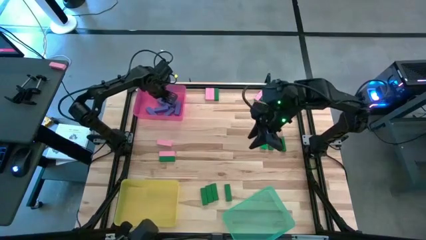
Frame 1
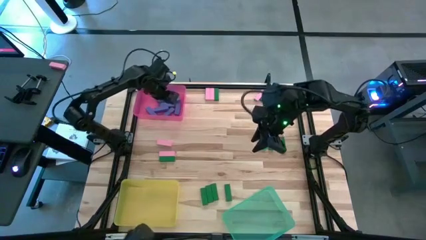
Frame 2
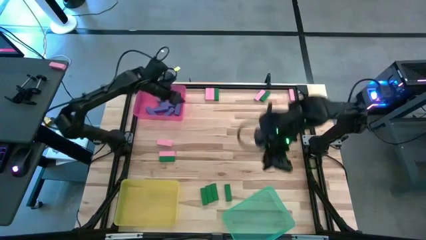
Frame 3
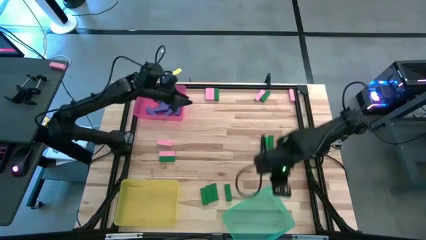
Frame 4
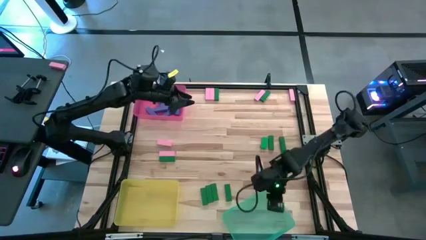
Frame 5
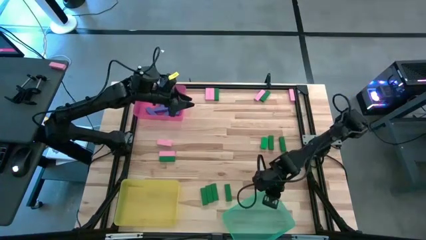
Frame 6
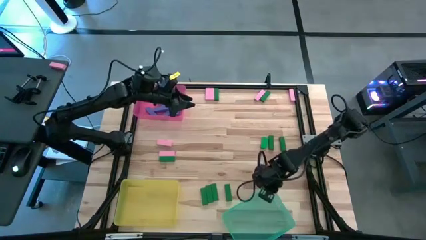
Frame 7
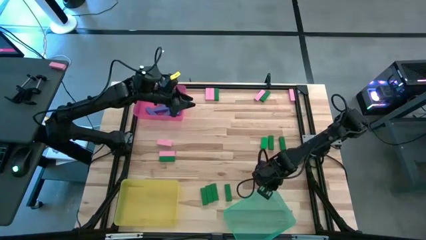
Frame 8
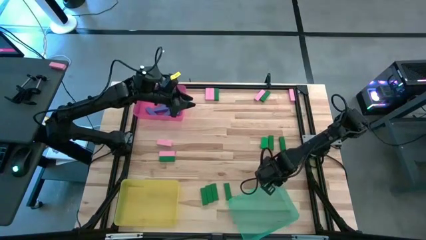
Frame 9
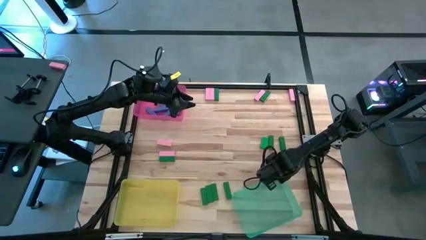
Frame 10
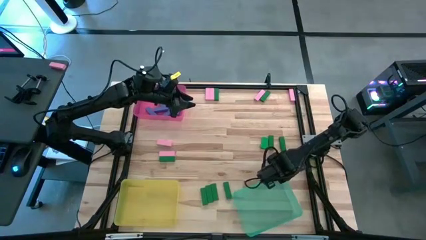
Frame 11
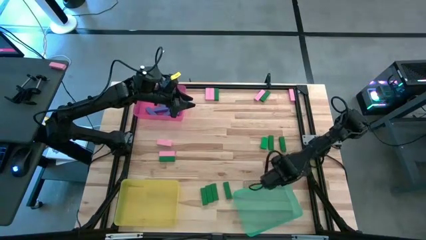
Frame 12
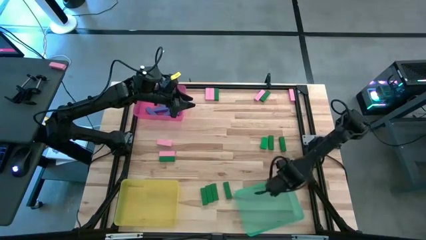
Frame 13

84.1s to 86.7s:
Task: Sort blocks
Adjust the light green bin

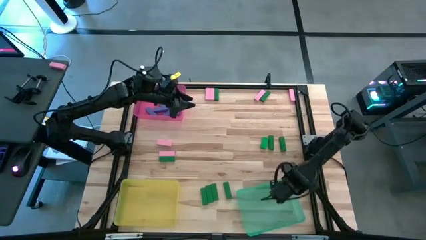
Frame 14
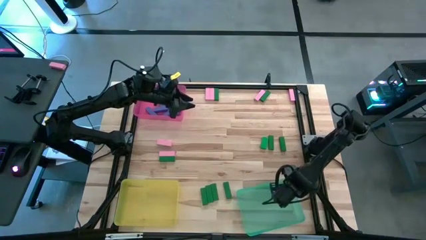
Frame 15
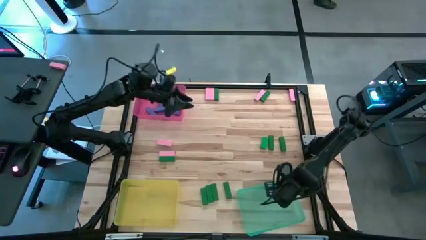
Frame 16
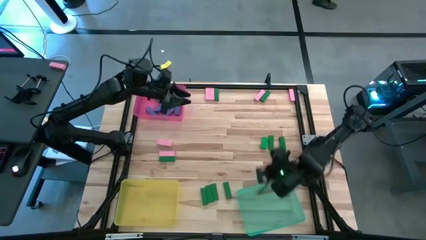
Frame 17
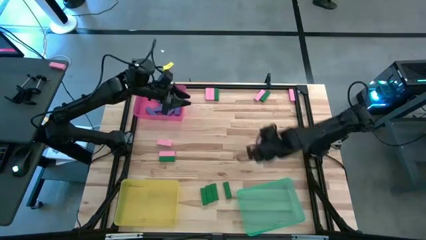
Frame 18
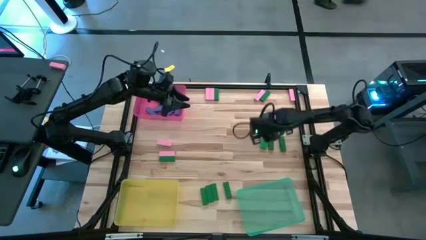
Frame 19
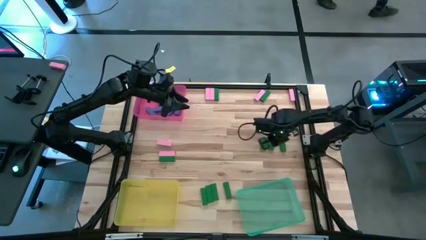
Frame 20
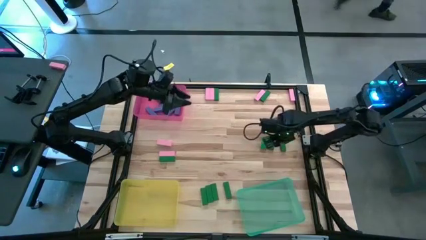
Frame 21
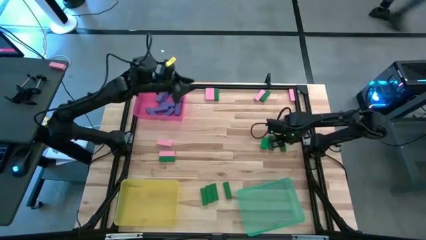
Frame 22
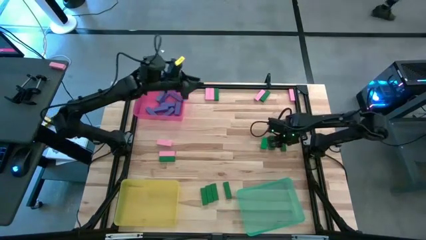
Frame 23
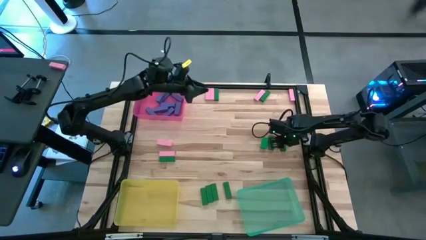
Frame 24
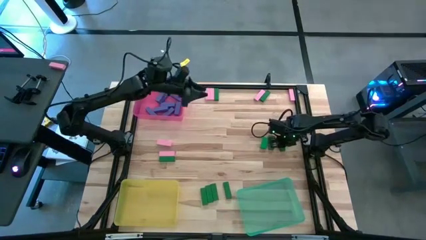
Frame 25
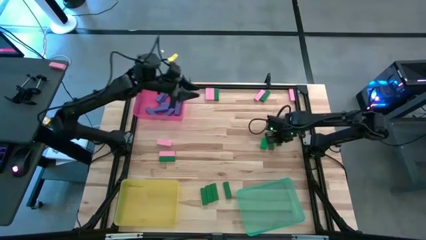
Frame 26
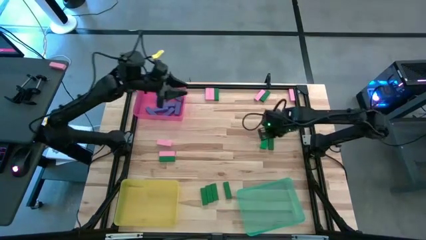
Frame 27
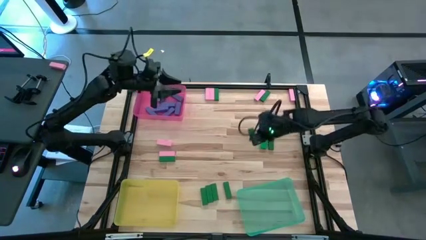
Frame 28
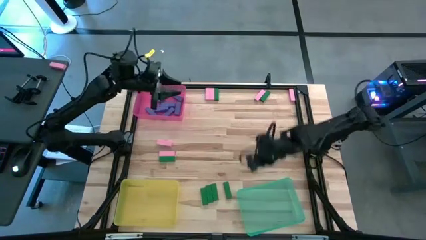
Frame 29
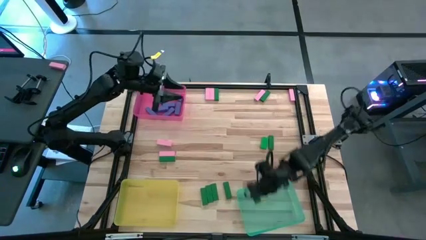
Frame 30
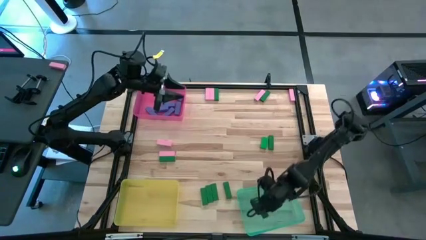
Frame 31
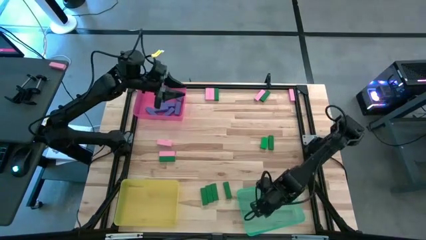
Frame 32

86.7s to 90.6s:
Put the green block into the light green bin

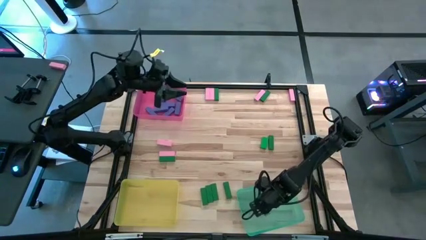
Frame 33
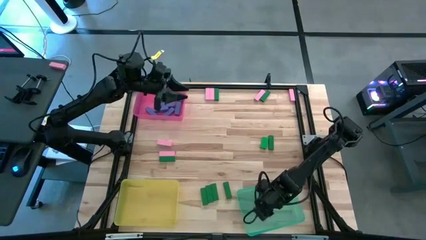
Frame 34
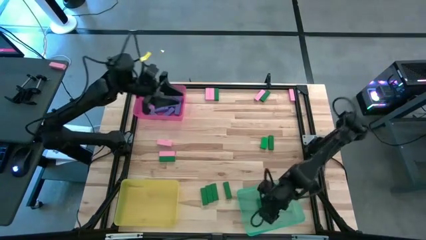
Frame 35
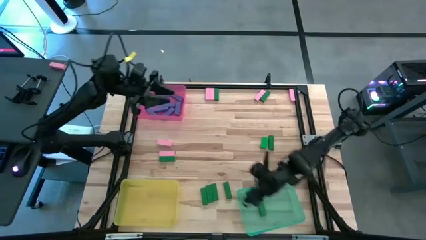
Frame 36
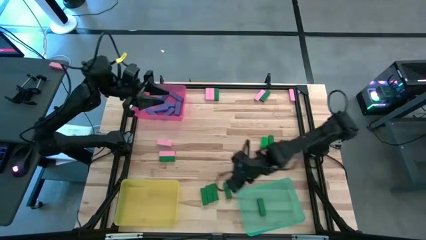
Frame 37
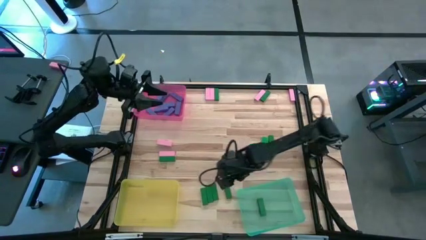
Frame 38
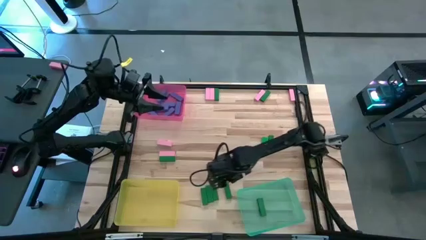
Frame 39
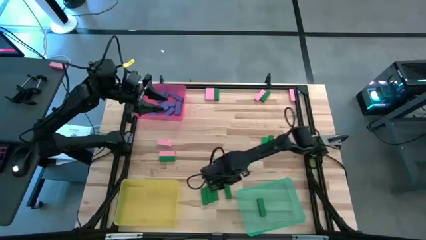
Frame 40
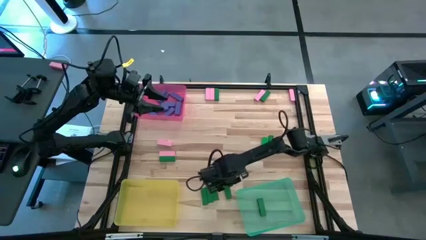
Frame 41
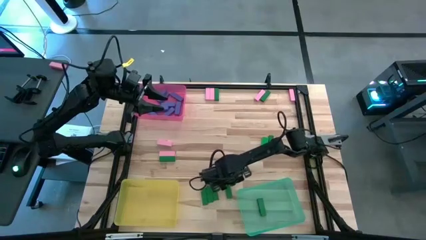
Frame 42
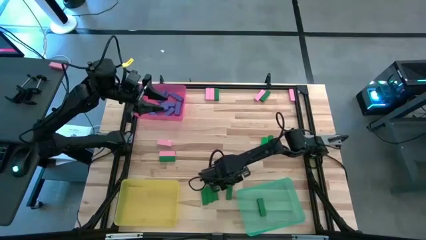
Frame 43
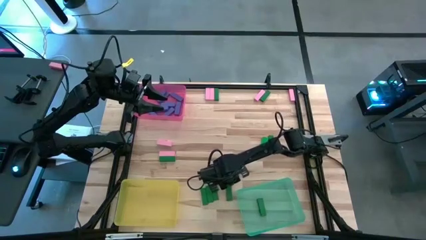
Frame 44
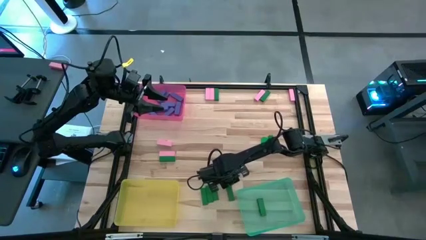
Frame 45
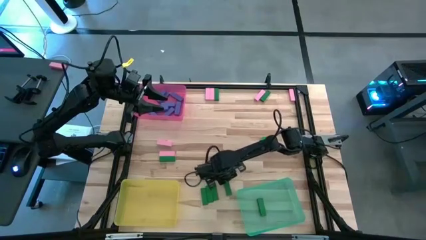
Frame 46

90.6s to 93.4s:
Put the green block into the light green bin

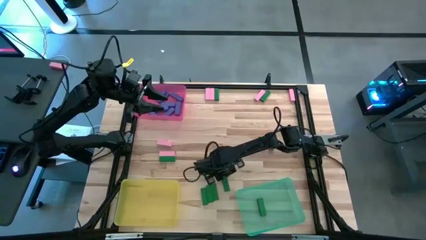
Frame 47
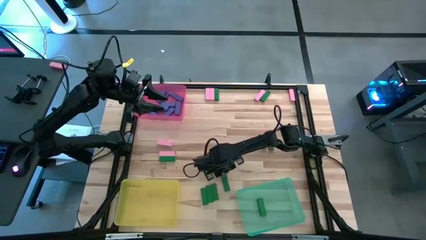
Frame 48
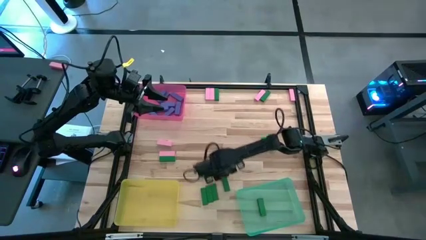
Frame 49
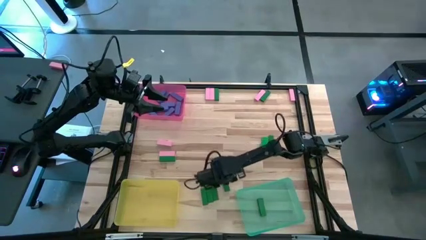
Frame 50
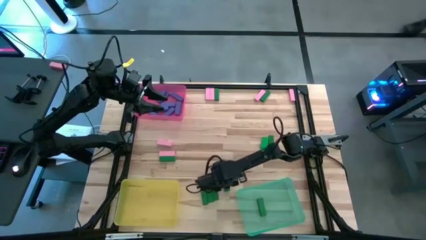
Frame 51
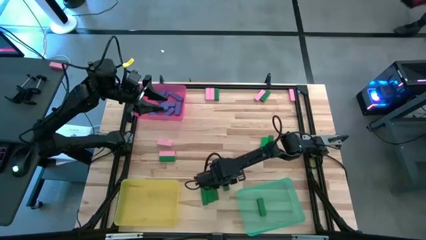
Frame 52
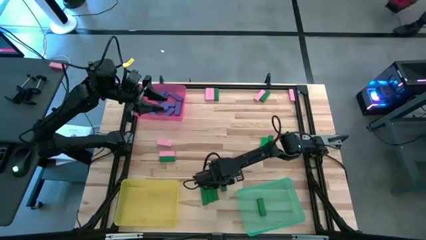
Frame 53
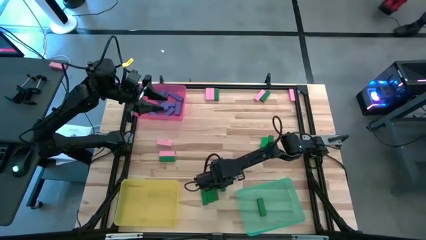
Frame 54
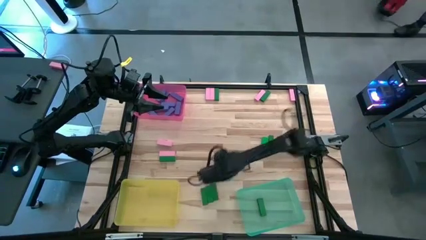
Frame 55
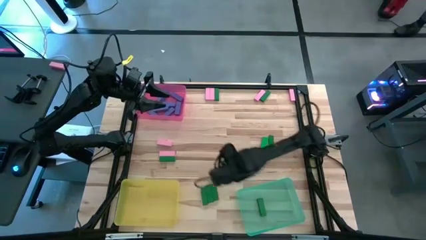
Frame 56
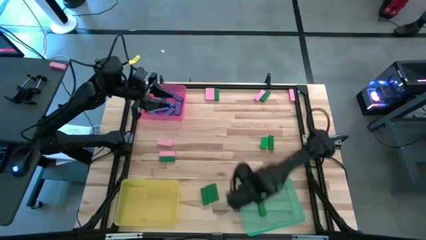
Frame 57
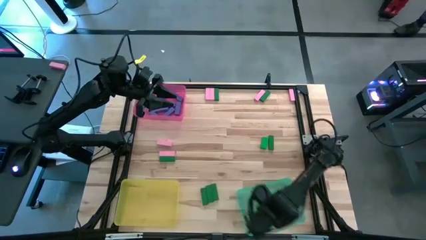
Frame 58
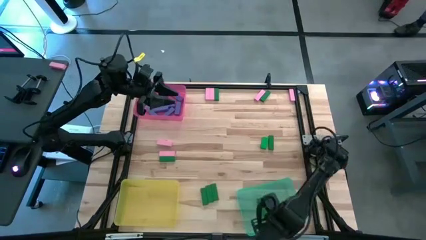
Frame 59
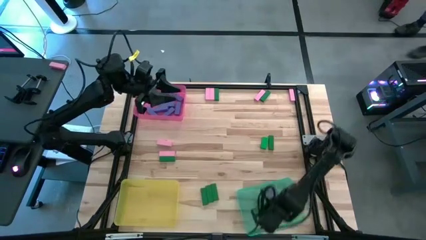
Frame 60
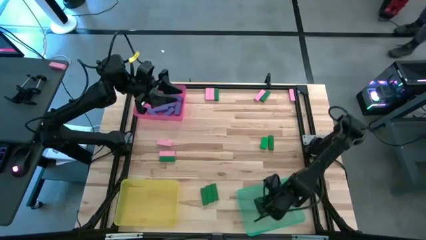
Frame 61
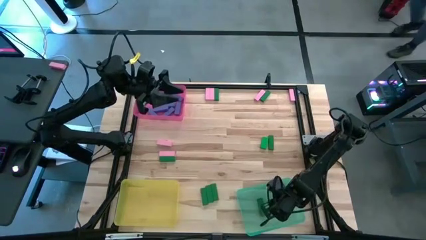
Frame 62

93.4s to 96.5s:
Put the green block into the light green bin
